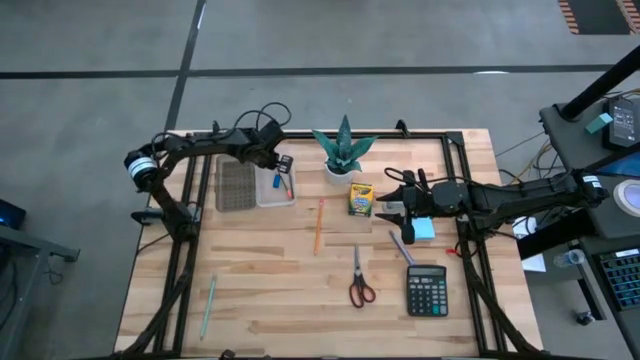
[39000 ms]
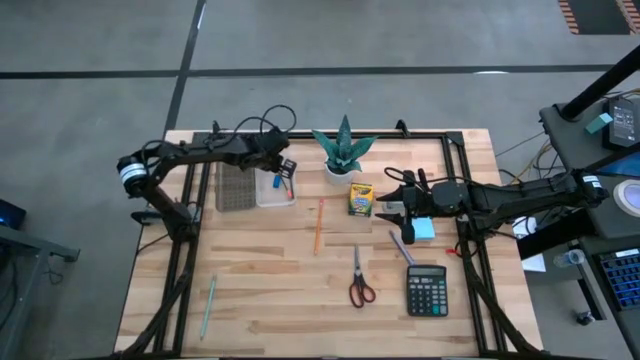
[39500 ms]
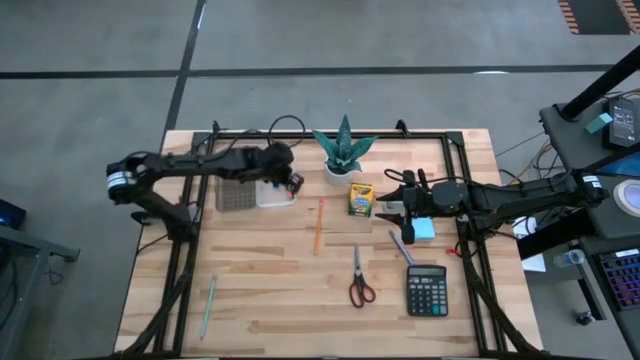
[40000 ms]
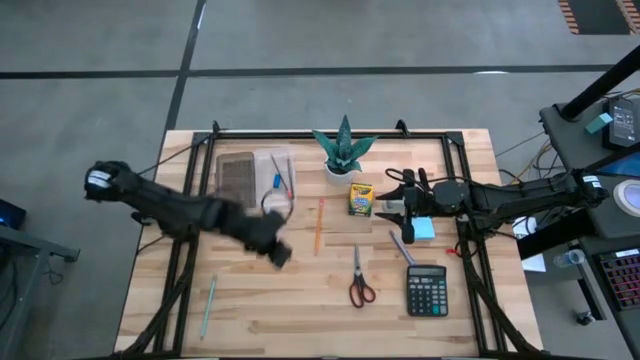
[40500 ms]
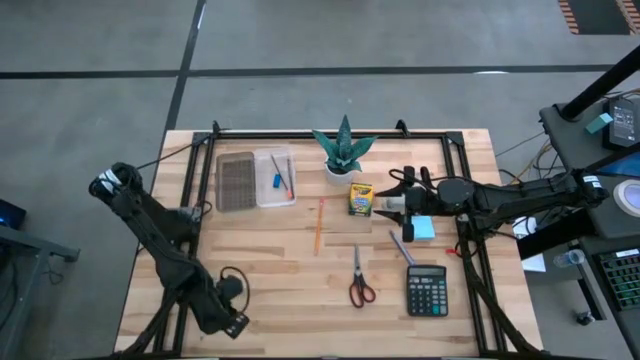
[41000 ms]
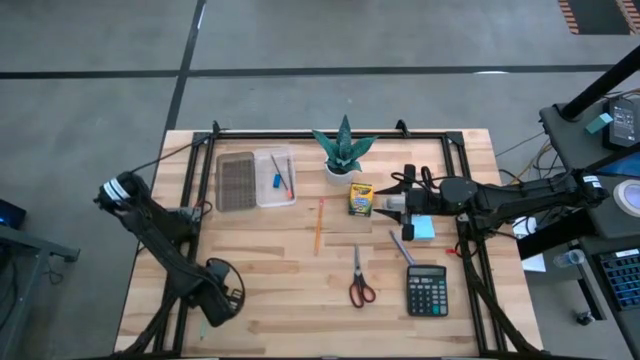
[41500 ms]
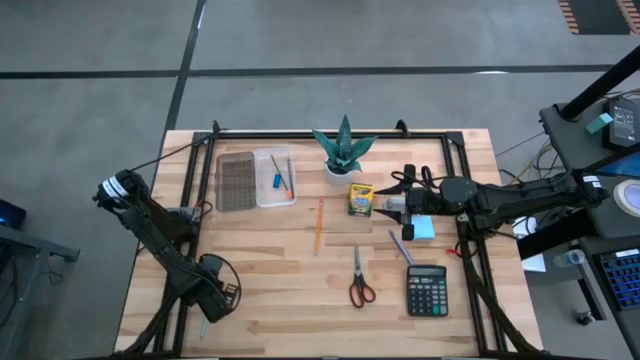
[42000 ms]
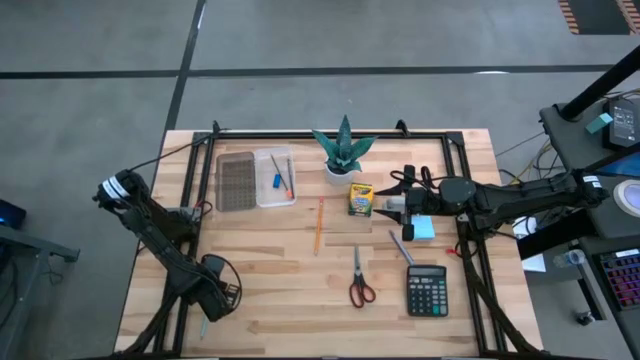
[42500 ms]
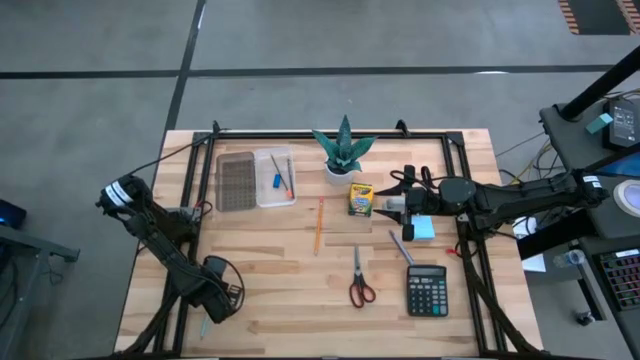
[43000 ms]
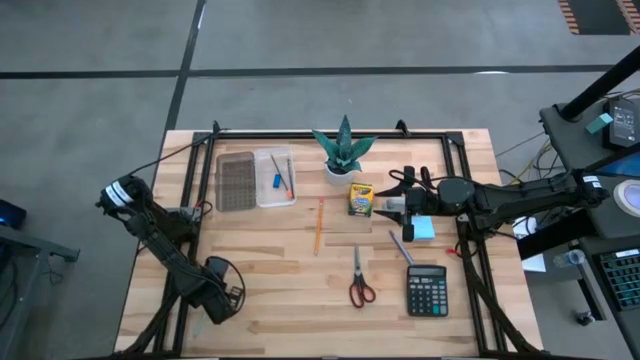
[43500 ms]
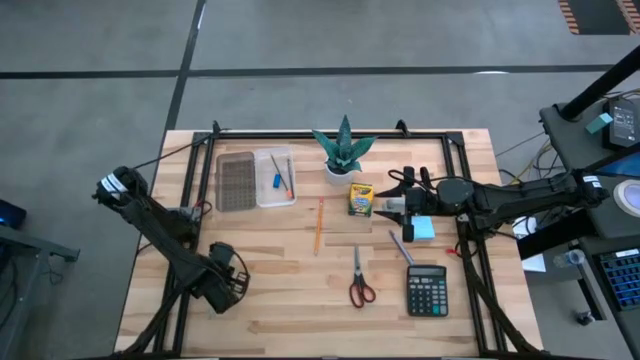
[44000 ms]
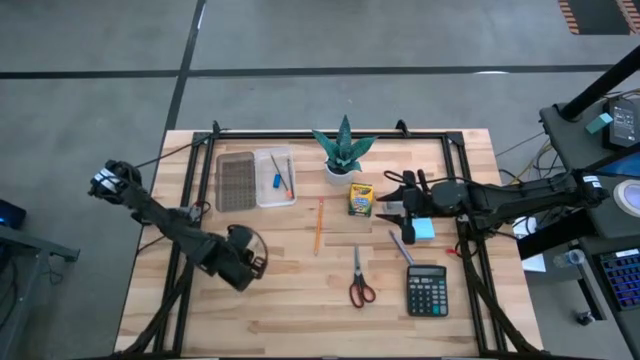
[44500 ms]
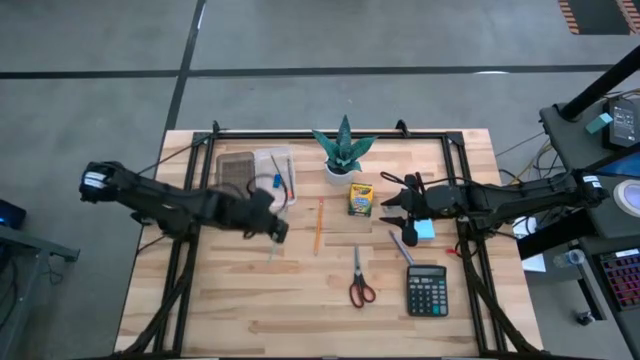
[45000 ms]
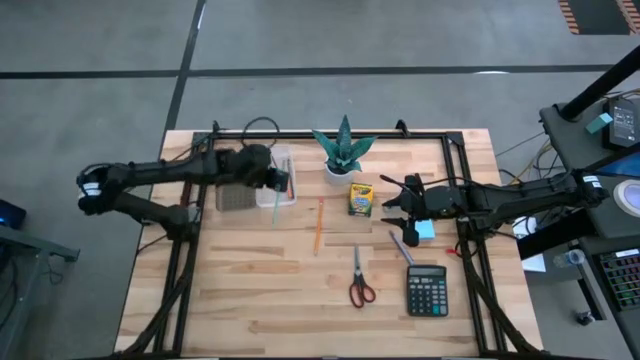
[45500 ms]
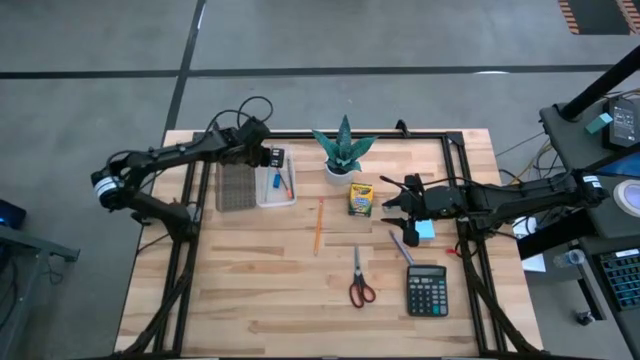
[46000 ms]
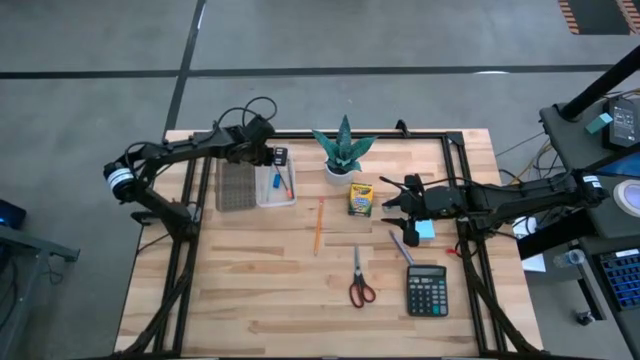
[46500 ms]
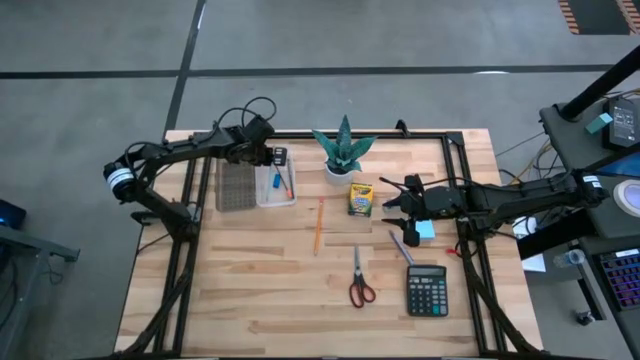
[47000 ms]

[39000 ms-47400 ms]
Task: Pack school essentials
Put the light blue pen into the black supply box

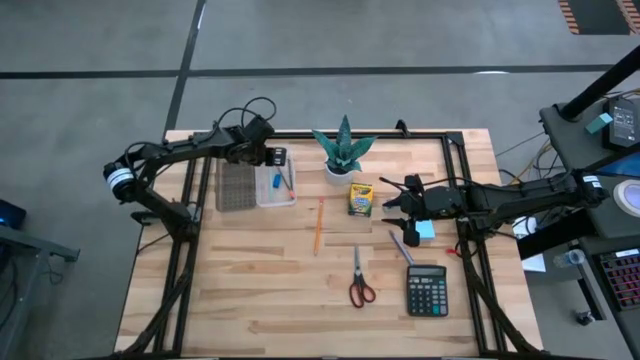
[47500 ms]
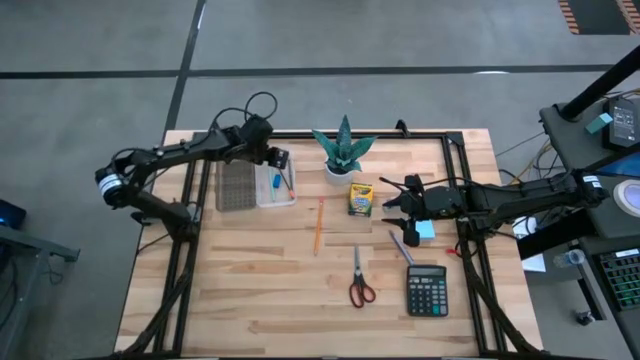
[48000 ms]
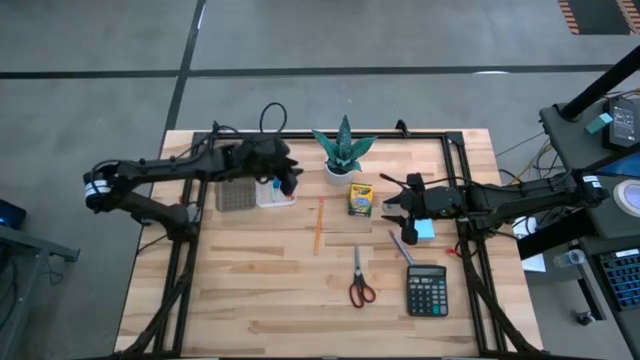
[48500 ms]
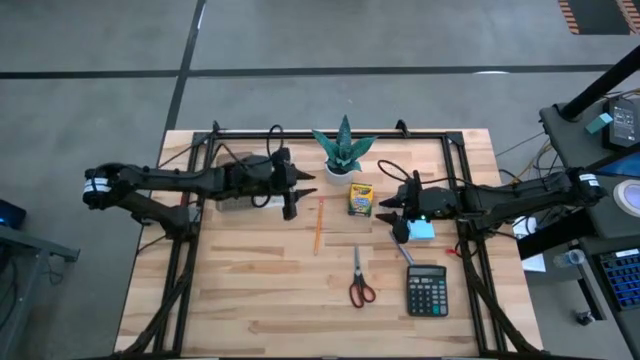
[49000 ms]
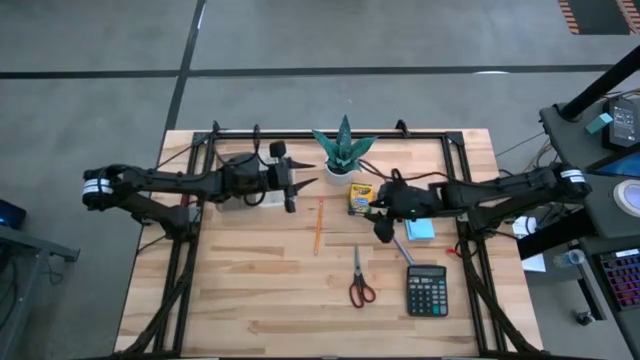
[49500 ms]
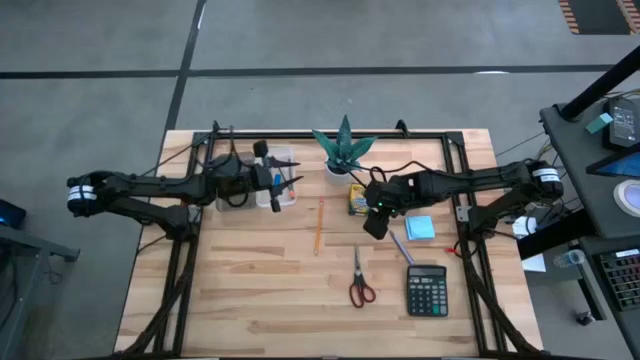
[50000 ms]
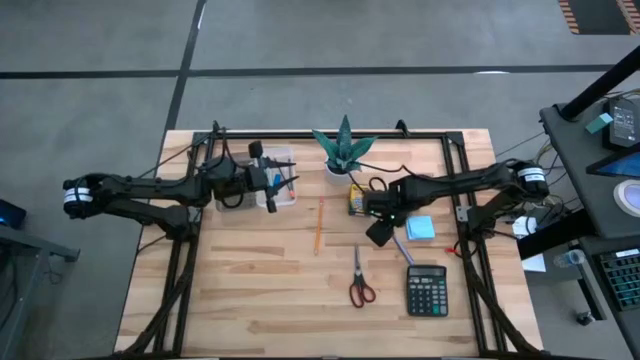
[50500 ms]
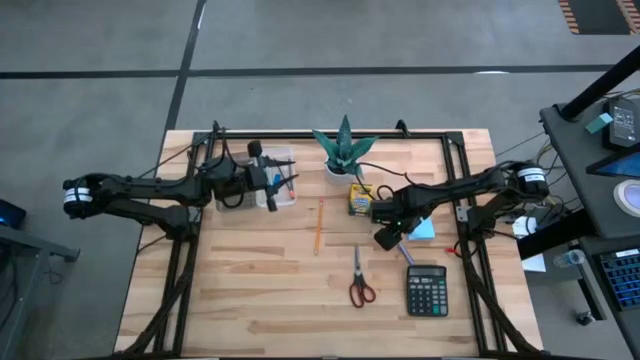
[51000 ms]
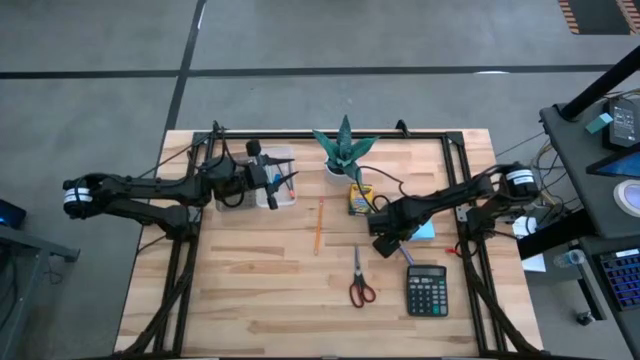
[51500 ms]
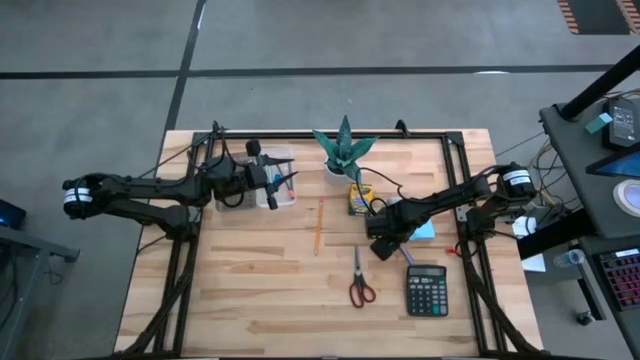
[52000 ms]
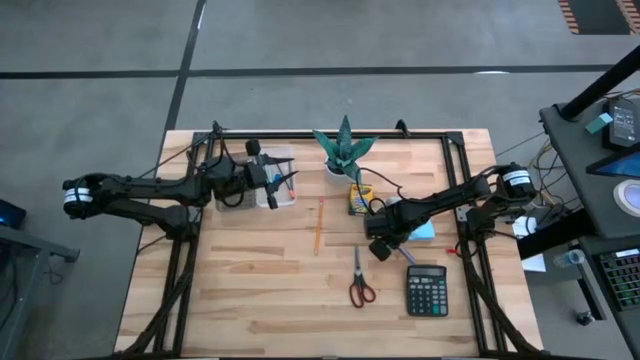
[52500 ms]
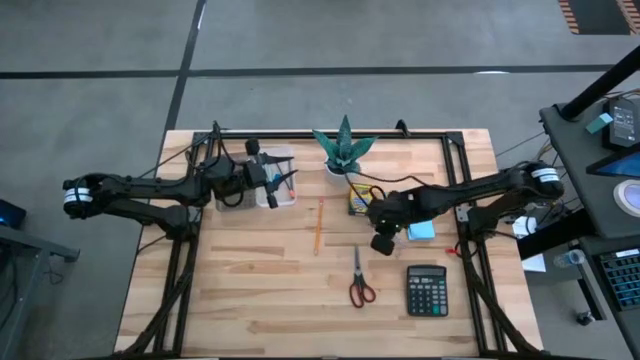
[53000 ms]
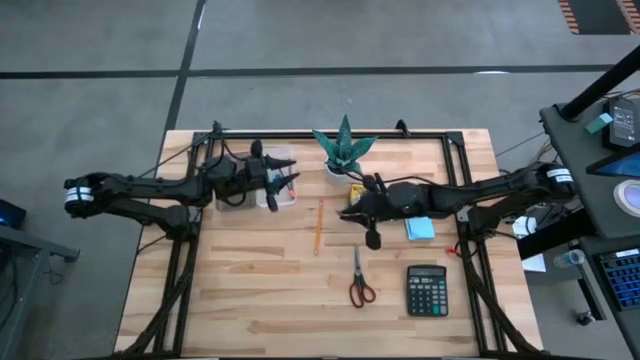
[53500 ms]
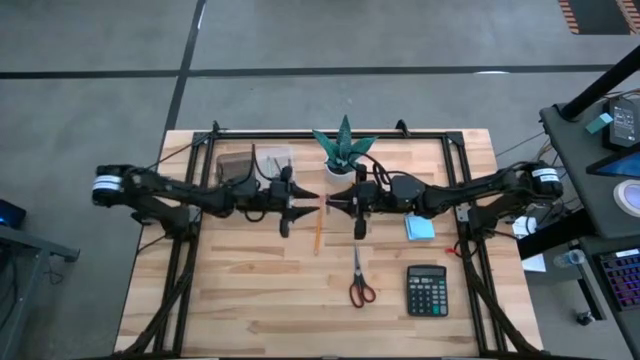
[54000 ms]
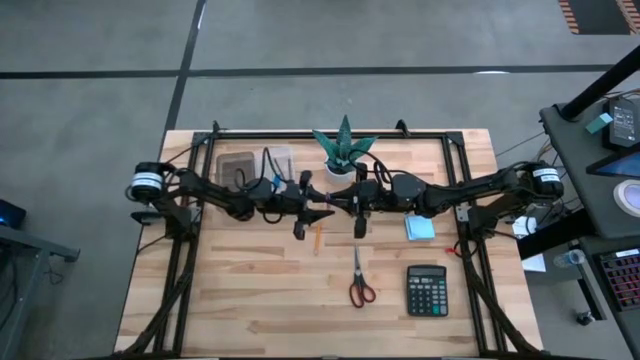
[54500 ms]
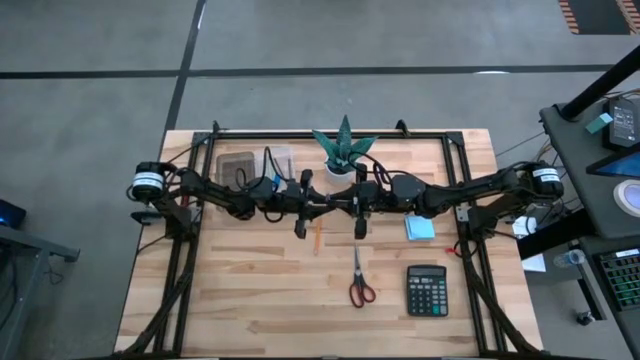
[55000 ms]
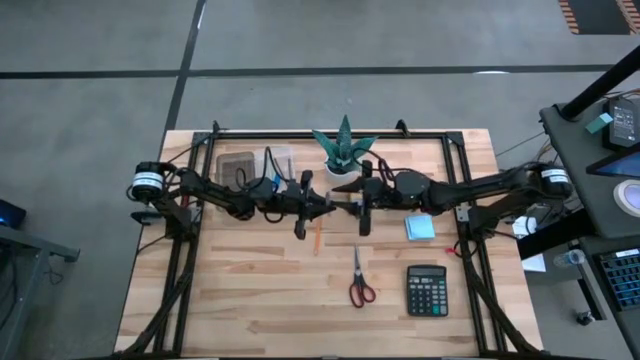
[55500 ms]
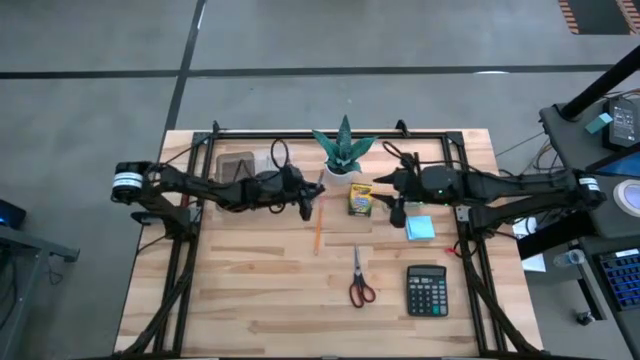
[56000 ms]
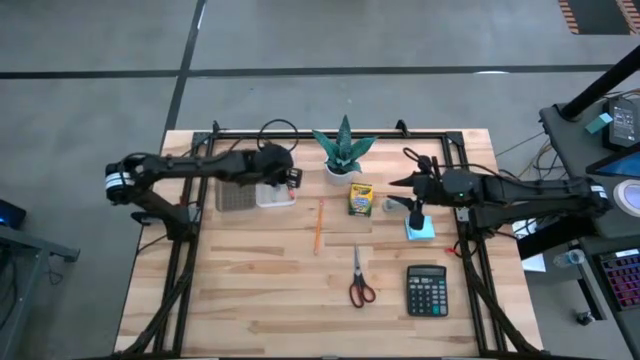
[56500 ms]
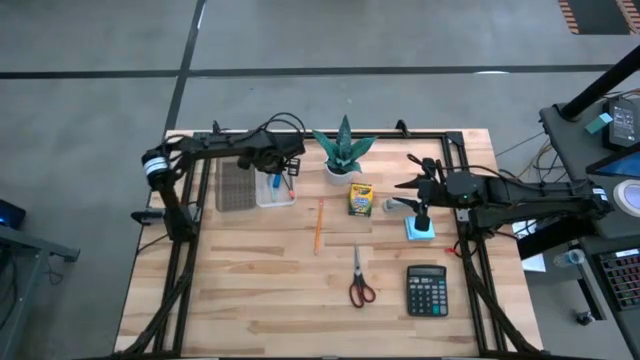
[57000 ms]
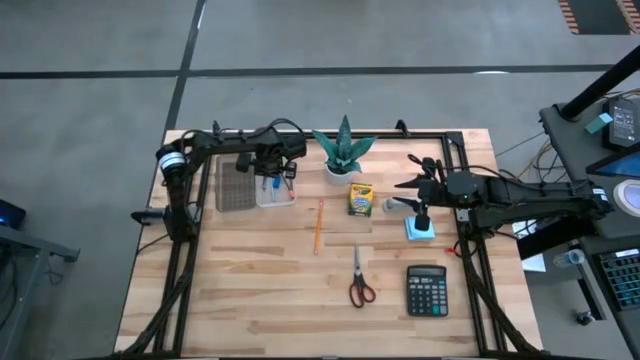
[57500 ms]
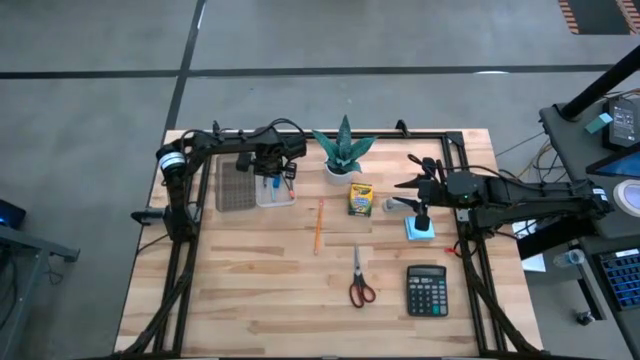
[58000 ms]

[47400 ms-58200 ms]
Put the purple pen into the black supply box

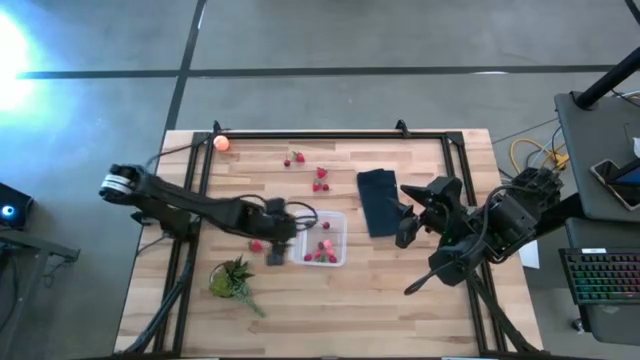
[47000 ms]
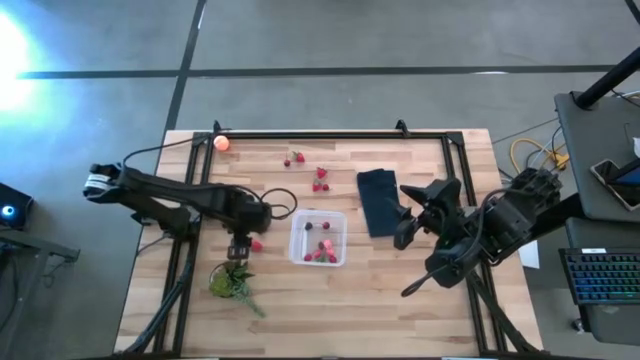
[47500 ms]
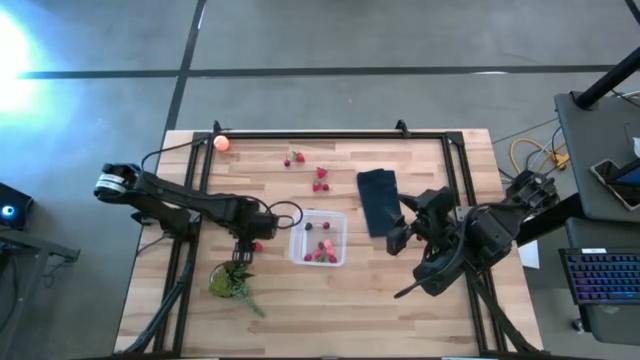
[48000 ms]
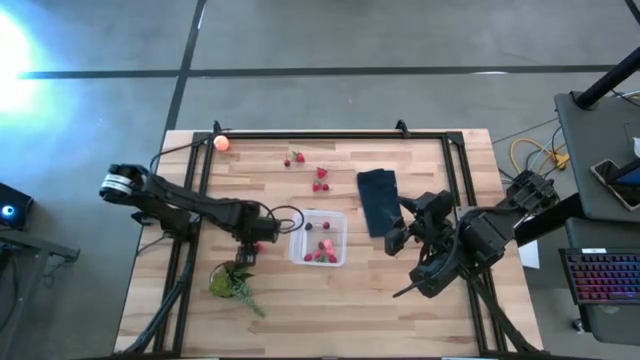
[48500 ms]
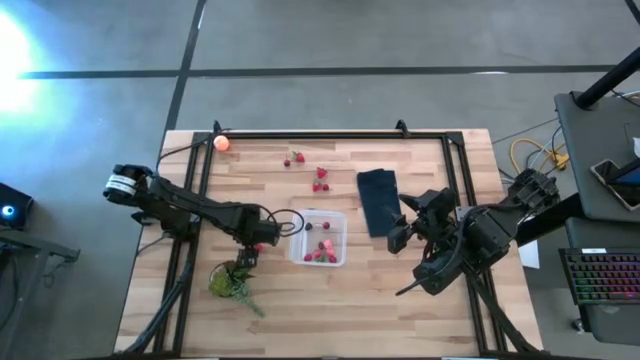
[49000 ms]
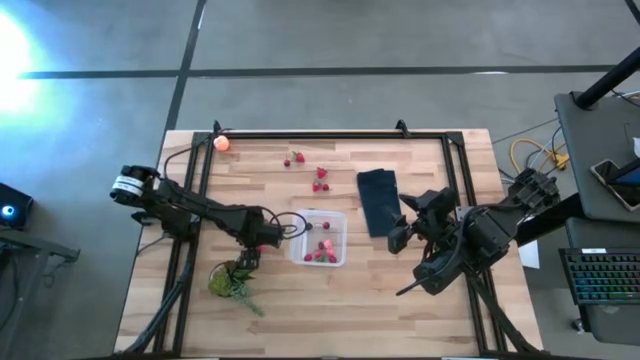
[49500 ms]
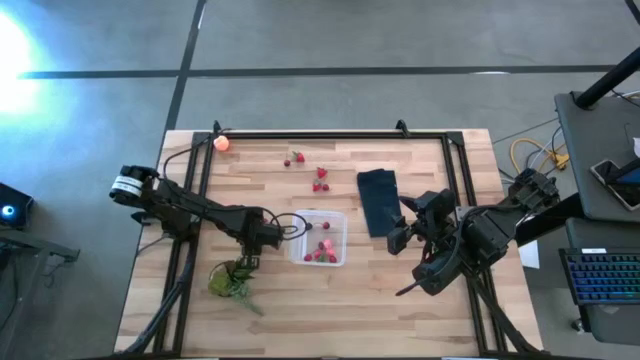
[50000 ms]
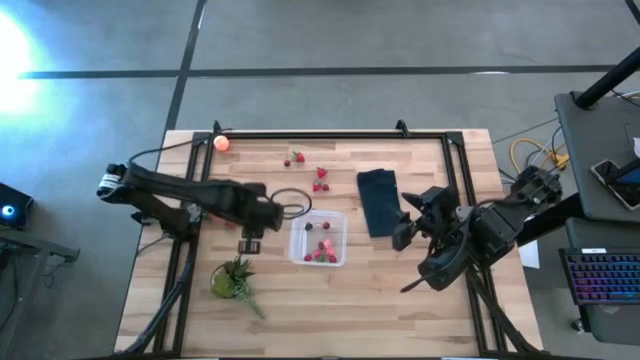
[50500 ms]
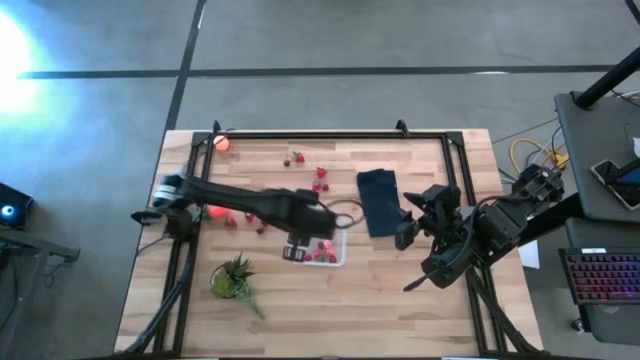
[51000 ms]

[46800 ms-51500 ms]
Task: Pick and placing Produce into tupperware
Put the red strawberry into the transparent bin
